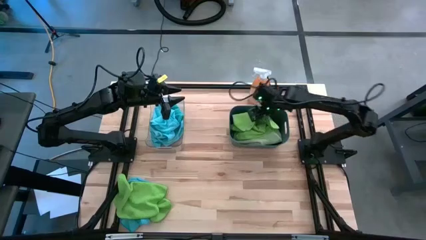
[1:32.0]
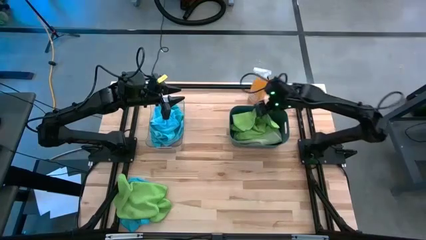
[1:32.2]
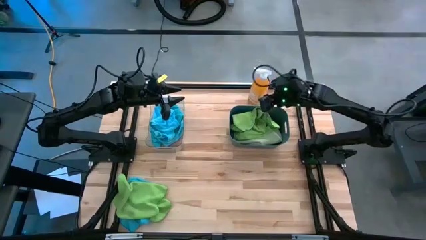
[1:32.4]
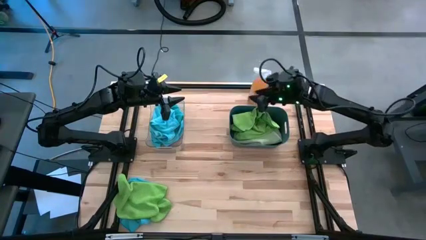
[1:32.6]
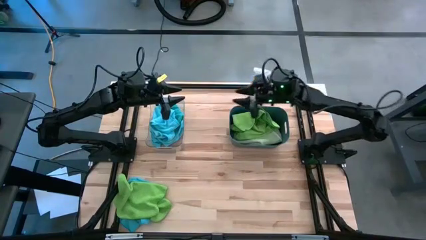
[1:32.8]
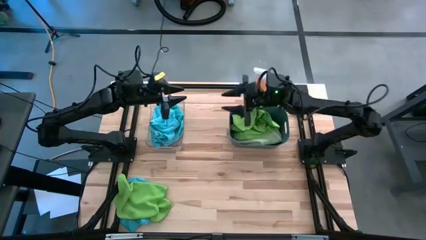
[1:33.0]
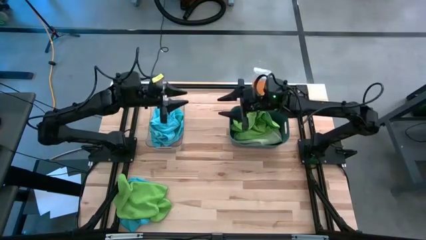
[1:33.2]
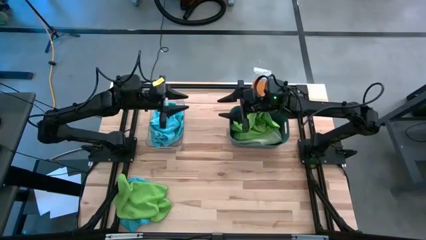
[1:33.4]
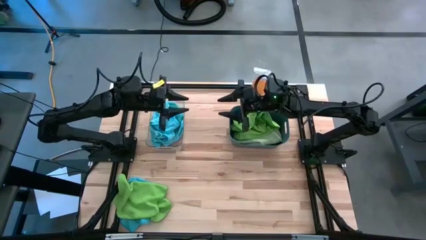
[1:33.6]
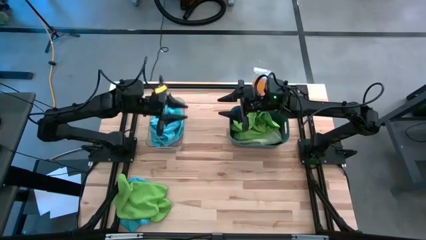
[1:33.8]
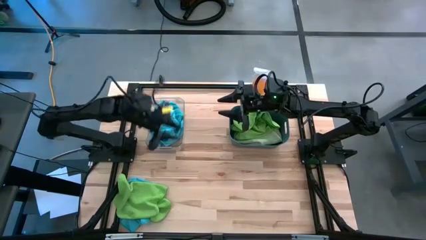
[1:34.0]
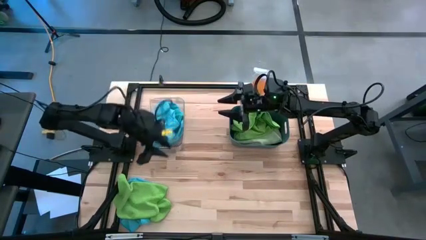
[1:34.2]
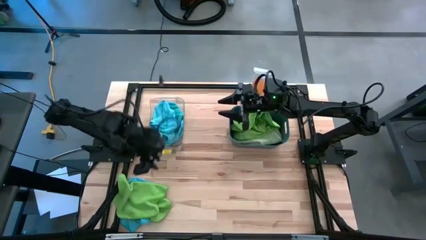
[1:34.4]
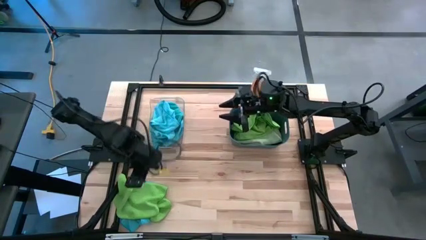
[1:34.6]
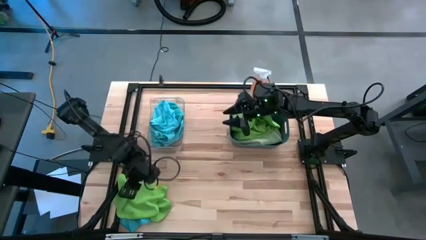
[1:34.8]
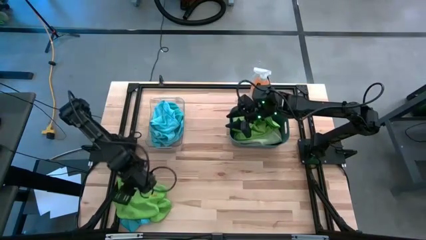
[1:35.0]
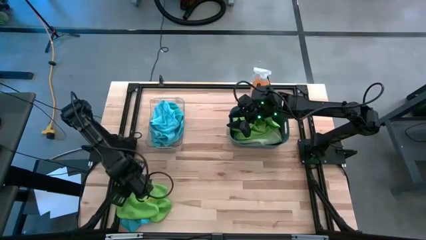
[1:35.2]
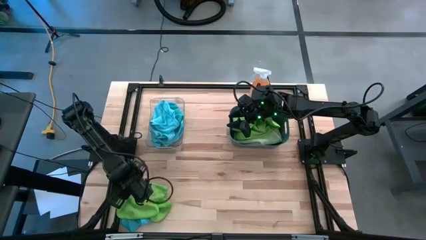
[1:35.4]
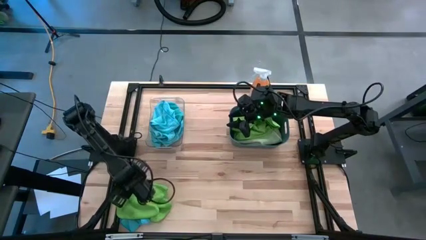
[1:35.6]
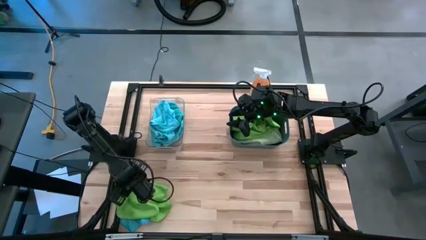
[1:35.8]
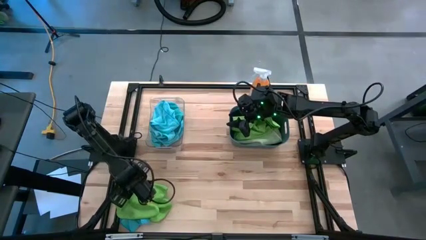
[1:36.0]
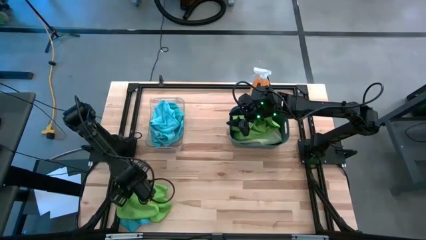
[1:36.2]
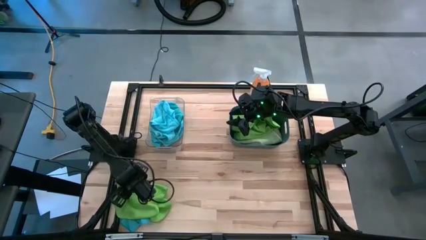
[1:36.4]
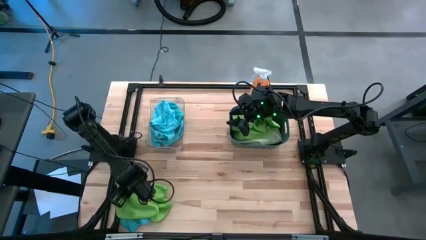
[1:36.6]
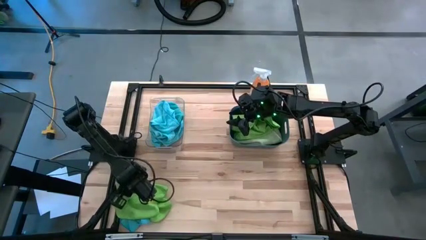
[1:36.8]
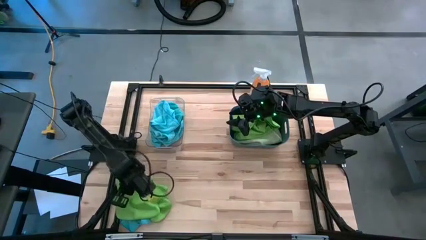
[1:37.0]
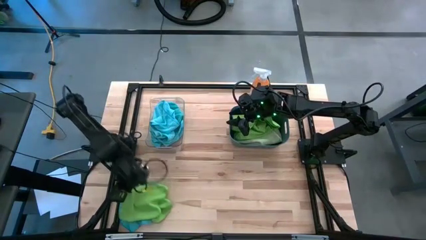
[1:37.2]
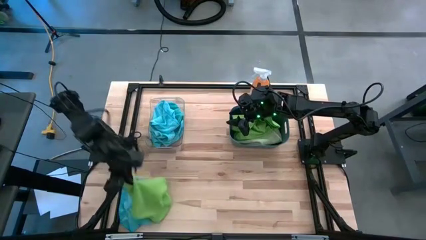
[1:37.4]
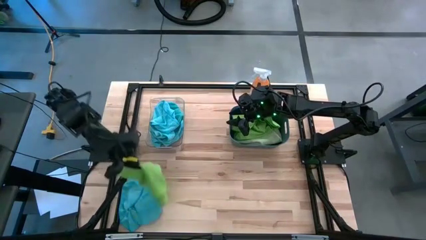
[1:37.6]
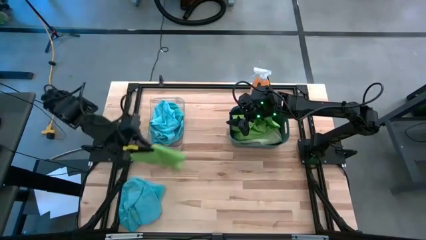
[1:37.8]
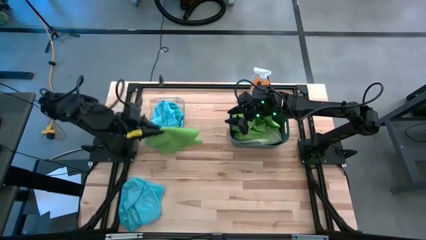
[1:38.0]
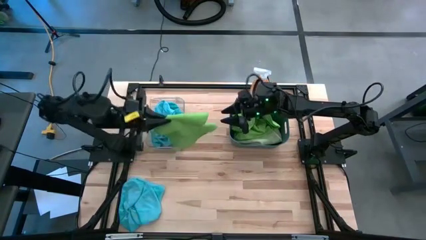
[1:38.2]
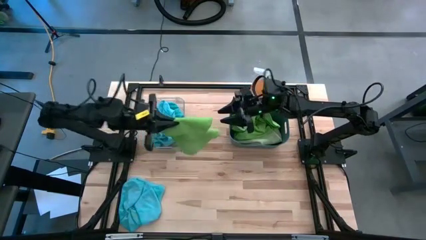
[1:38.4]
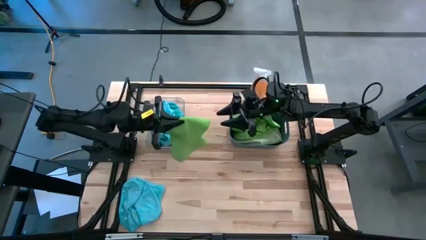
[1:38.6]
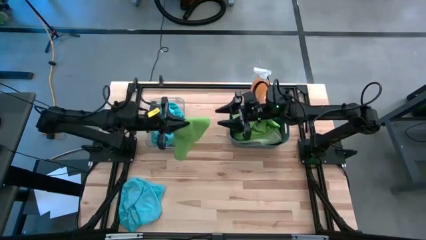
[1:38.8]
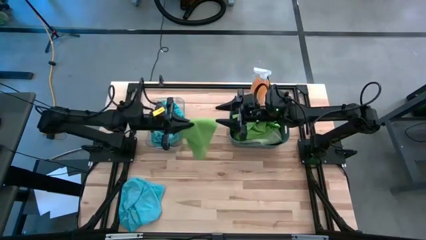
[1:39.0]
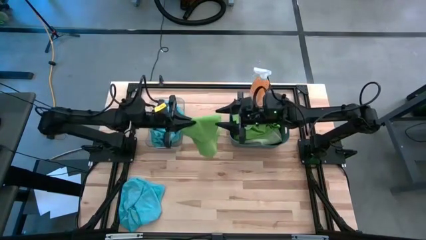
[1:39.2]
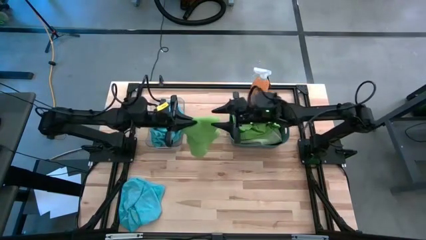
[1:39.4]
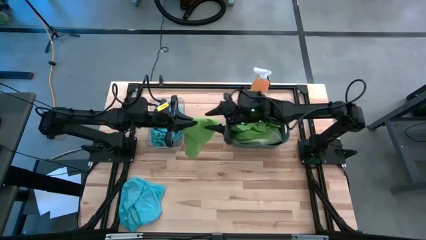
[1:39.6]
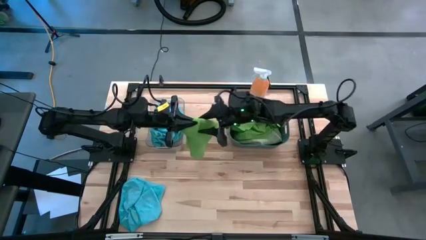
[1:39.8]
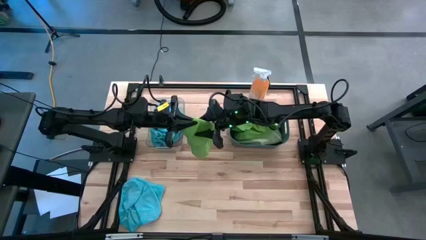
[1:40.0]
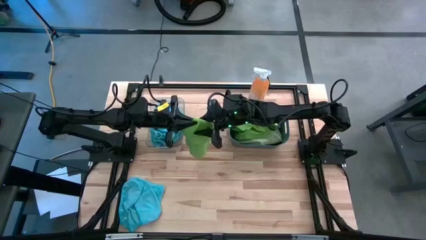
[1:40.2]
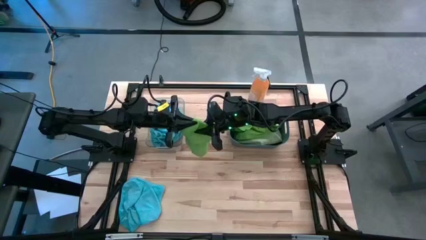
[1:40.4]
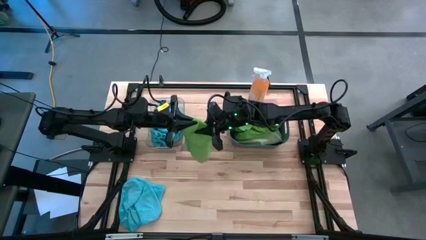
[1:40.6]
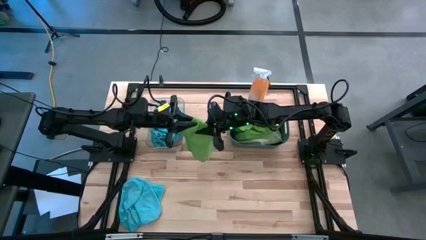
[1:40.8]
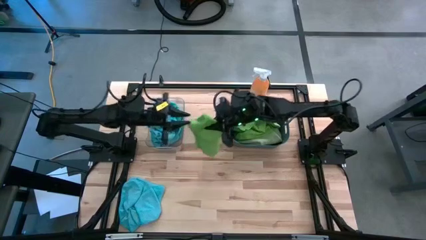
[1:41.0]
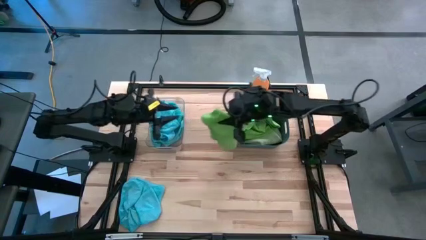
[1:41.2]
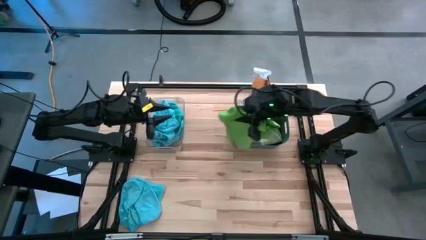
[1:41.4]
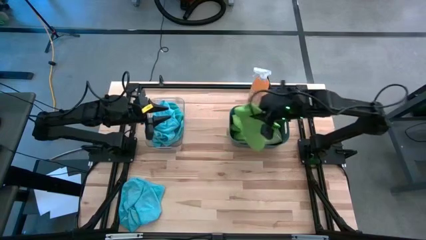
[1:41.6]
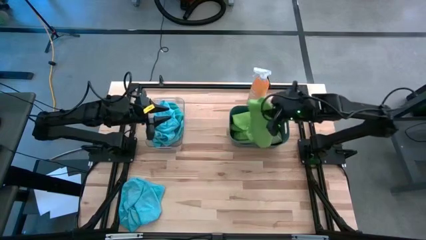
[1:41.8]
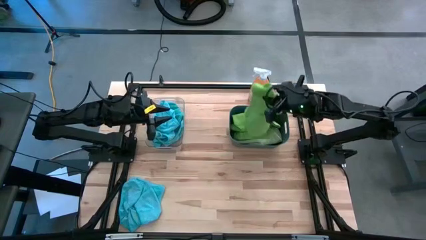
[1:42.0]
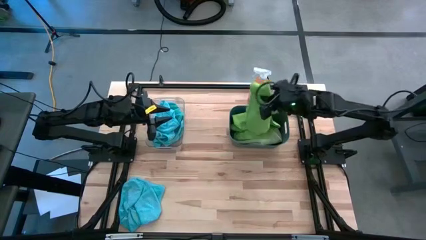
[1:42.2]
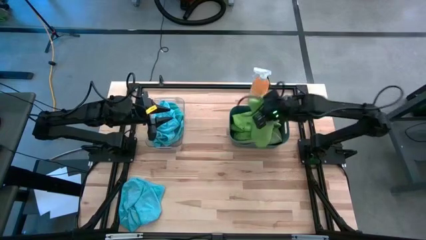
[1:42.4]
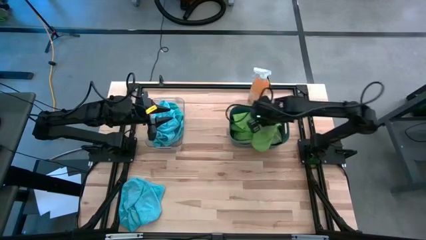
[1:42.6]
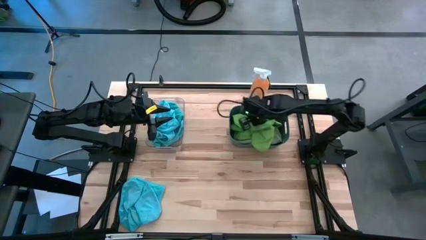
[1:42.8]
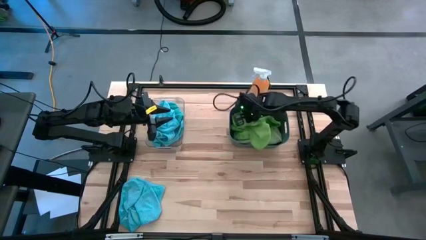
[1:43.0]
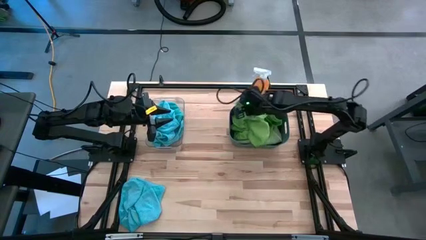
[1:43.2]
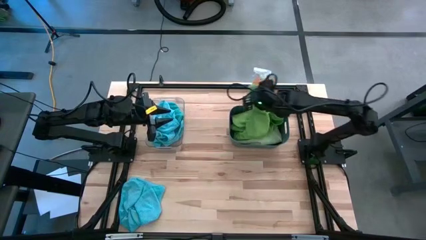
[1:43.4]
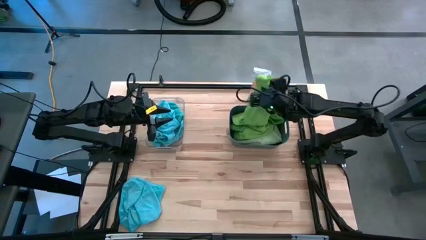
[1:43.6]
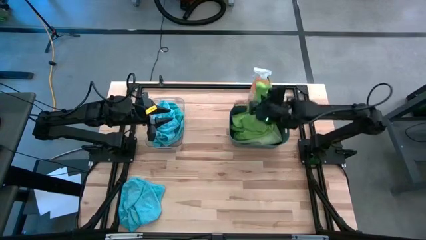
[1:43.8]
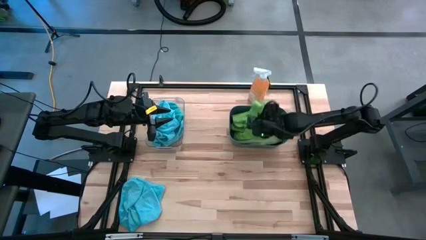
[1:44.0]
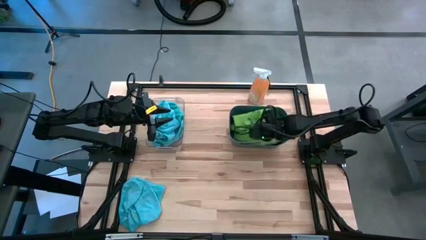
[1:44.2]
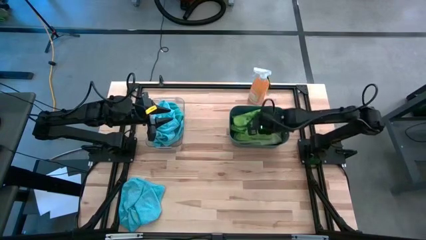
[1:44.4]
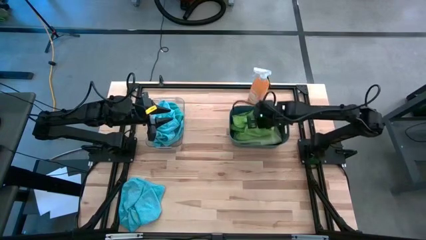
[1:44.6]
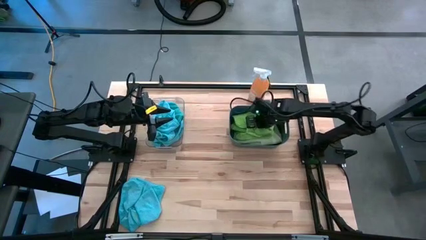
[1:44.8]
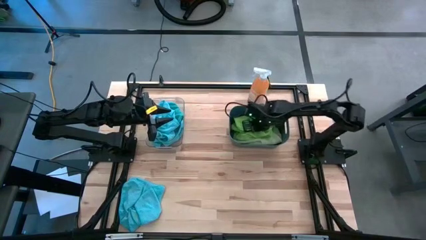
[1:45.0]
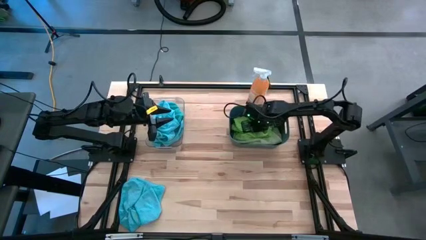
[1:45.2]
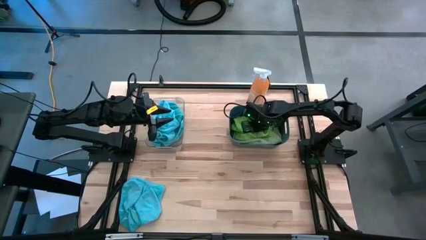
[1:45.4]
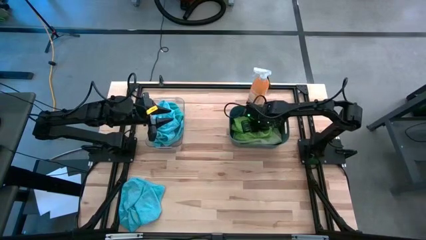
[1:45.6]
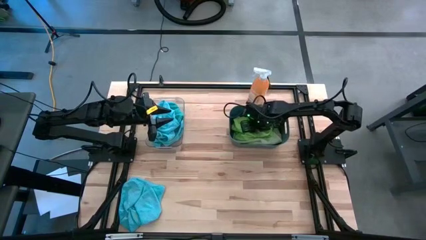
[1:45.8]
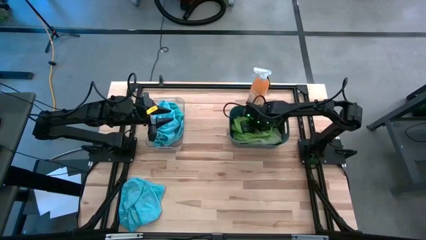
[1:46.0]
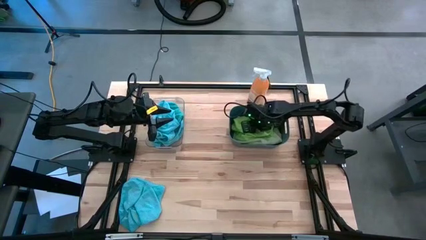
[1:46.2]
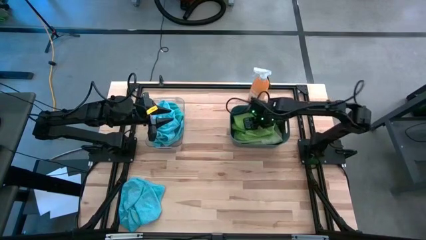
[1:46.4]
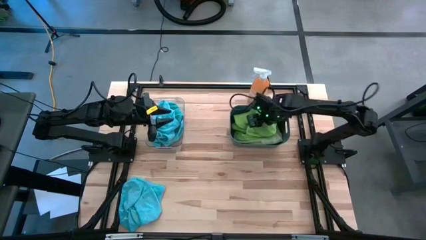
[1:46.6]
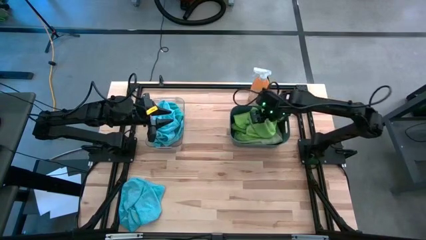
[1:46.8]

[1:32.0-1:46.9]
Task: Sort microfiber towel by color & place in baskets
Put the green microfiber towel into the blue bin

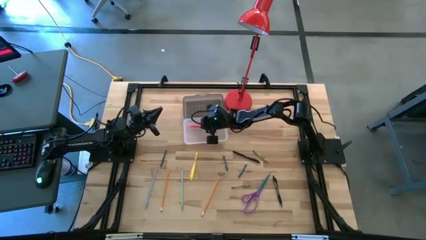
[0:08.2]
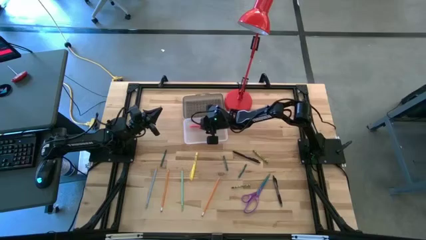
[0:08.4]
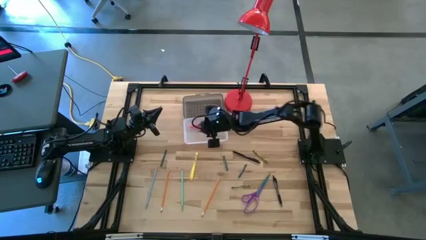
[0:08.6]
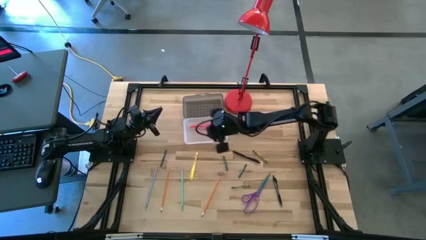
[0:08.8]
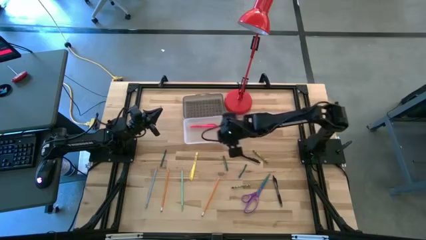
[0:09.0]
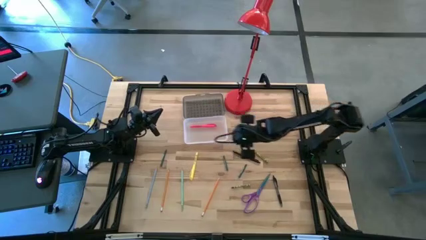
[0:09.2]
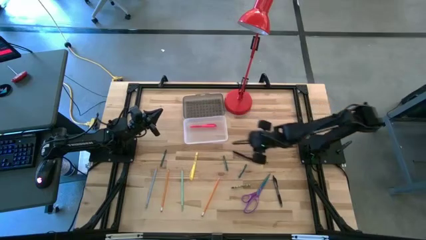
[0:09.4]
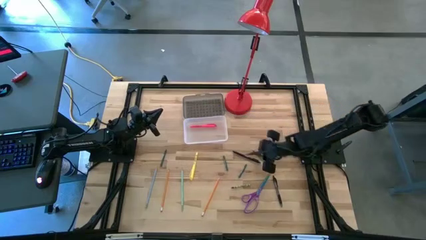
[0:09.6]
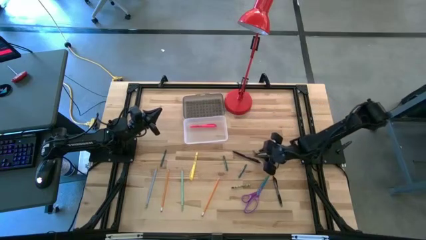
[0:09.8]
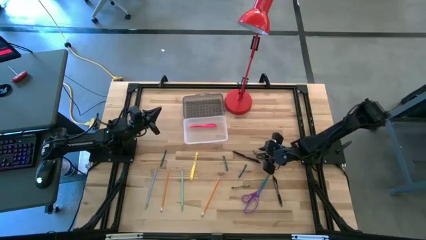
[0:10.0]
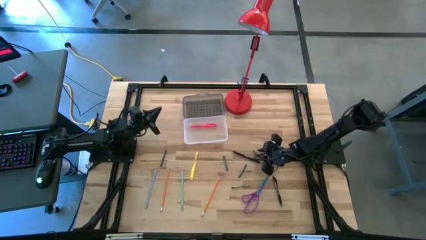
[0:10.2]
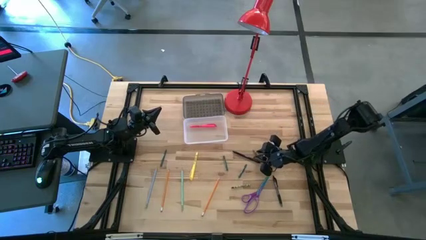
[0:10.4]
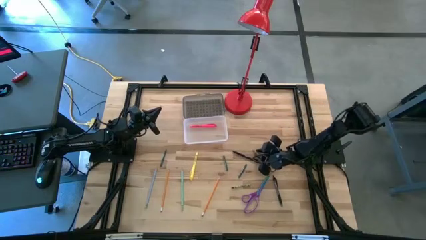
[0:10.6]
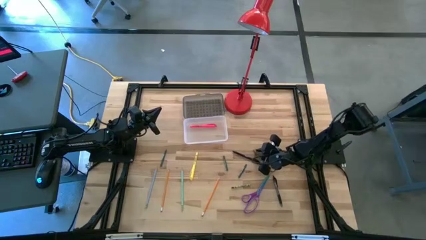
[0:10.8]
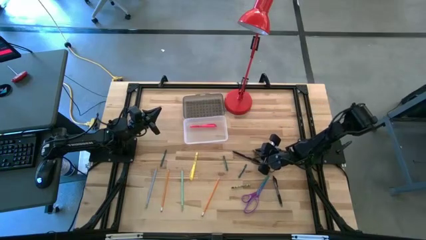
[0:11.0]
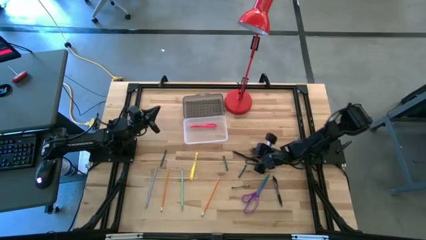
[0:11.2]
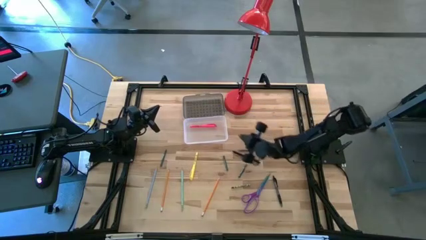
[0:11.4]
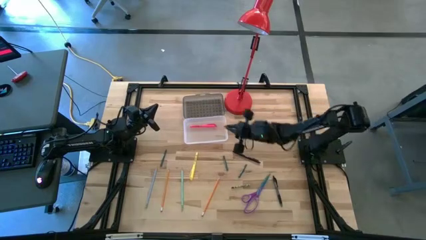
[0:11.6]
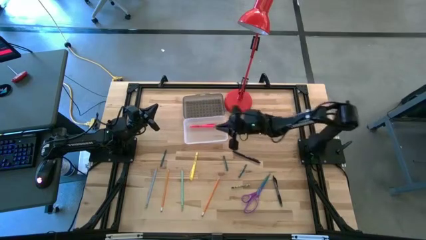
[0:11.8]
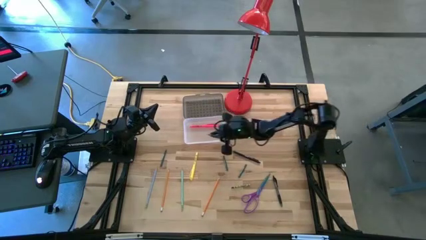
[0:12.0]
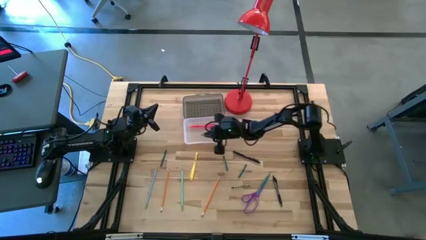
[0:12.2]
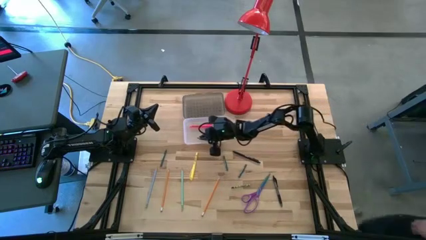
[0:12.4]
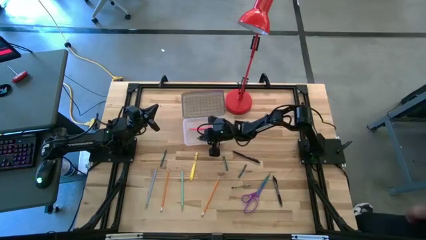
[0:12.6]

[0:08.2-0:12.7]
Task: Pick & place school supplies into a supply box
Put the top green crayon into the black supply box
